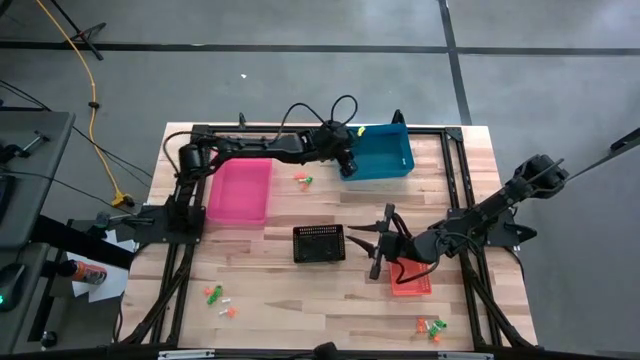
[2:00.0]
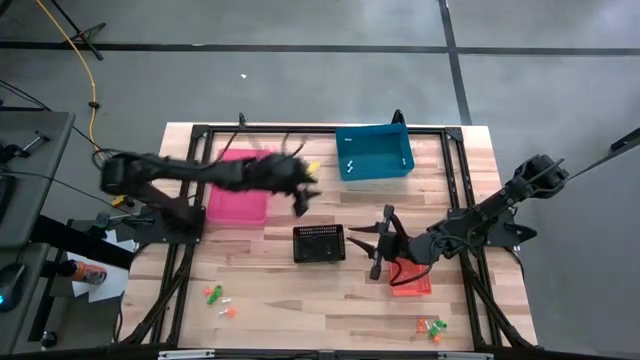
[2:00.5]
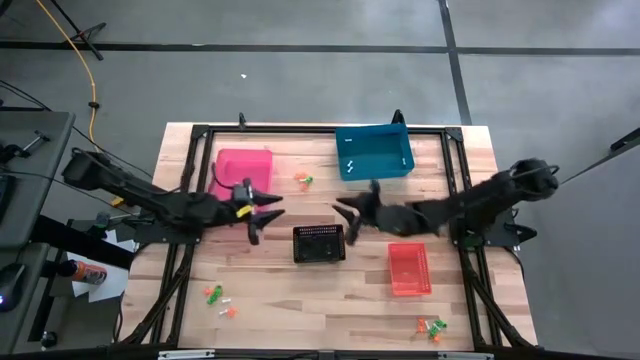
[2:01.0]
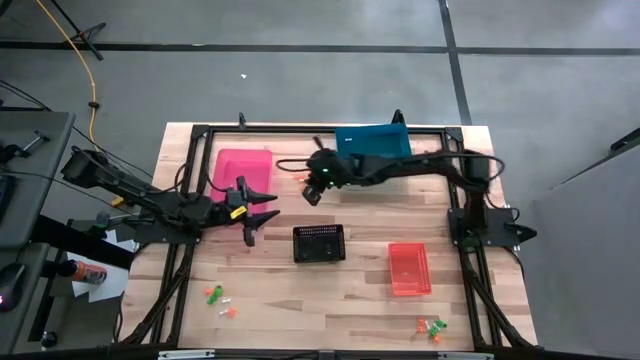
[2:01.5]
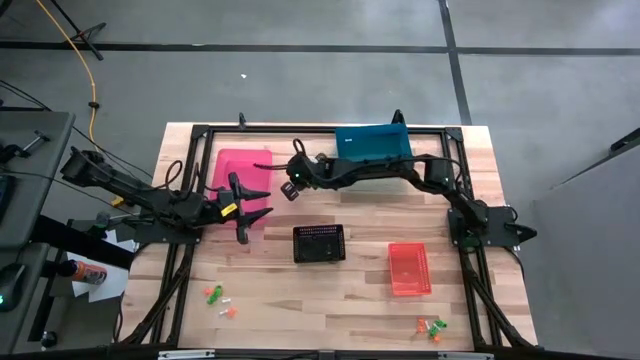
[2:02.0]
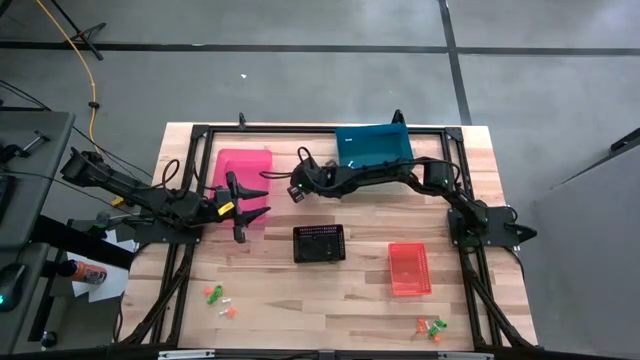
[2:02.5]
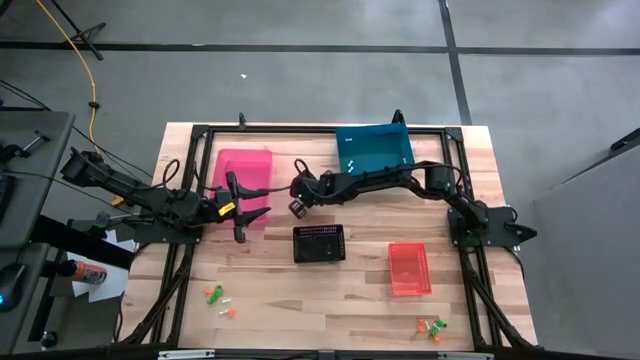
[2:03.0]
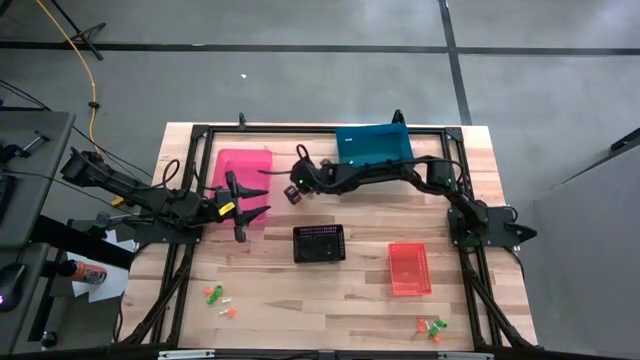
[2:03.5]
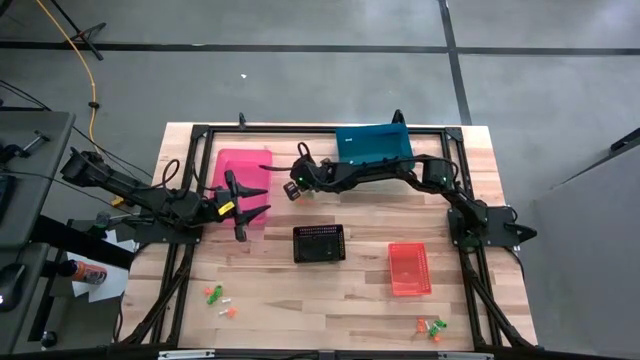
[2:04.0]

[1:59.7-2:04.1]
Task: Sort Halloween decoration
Put the white bone toy into the blue bin

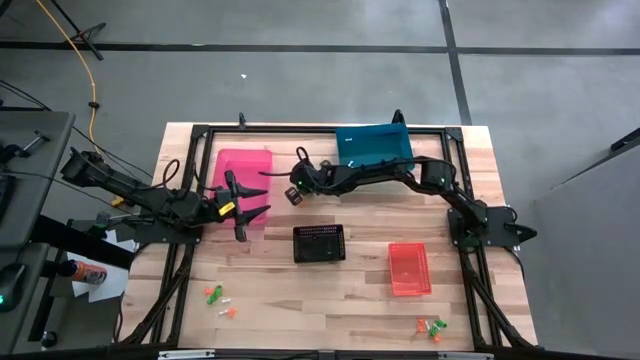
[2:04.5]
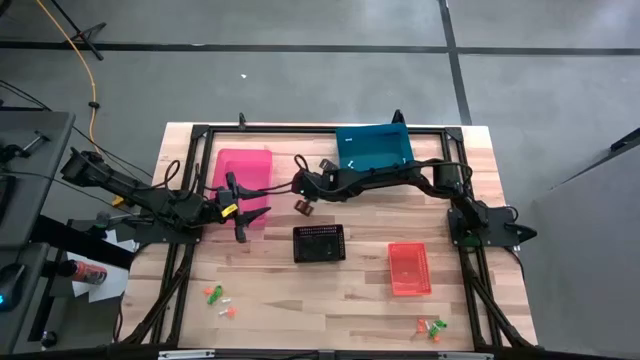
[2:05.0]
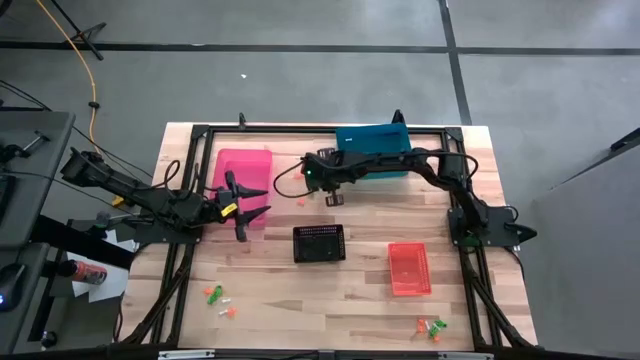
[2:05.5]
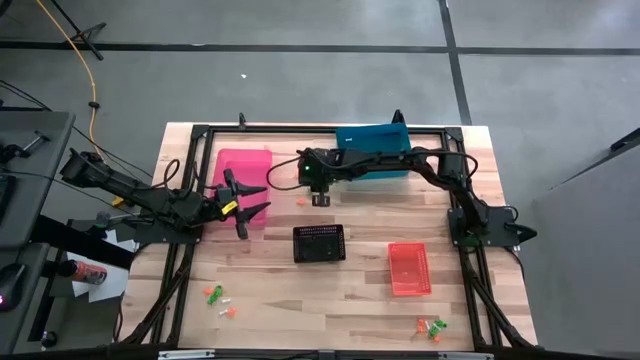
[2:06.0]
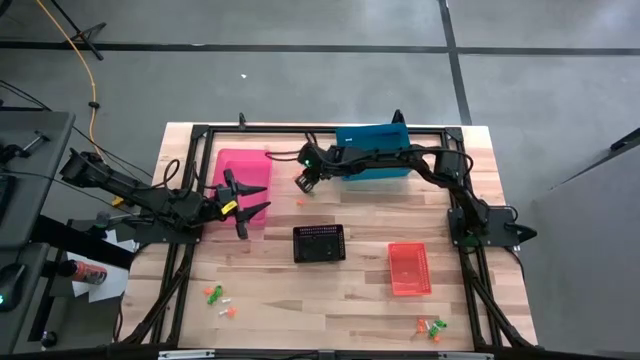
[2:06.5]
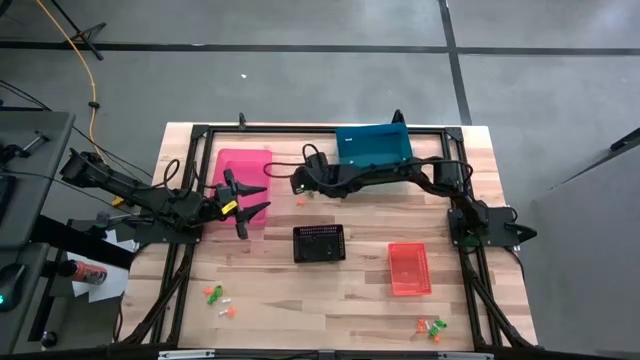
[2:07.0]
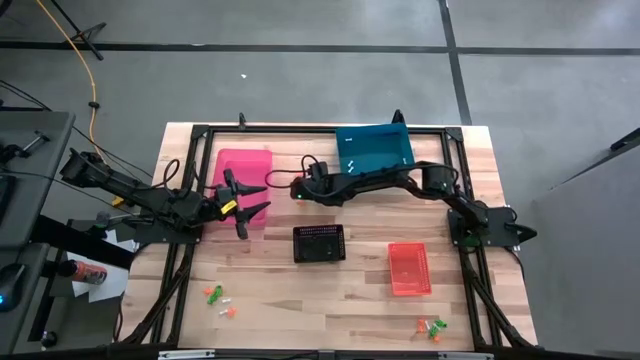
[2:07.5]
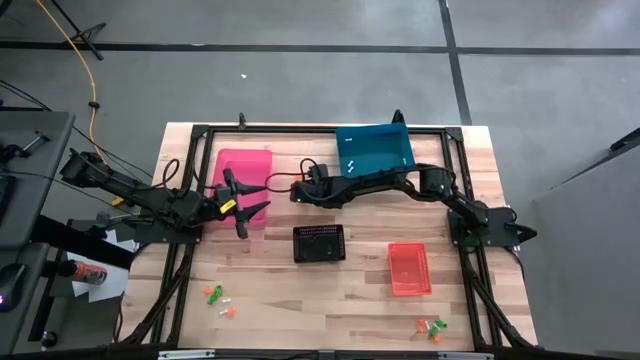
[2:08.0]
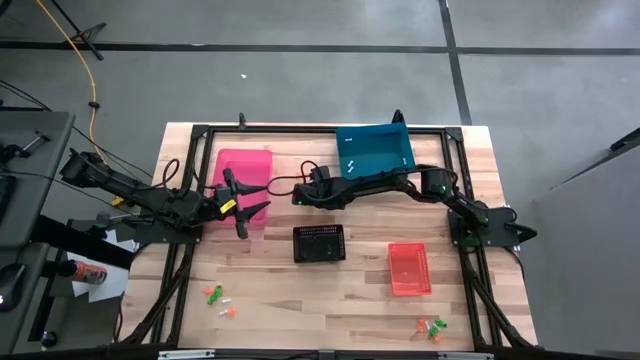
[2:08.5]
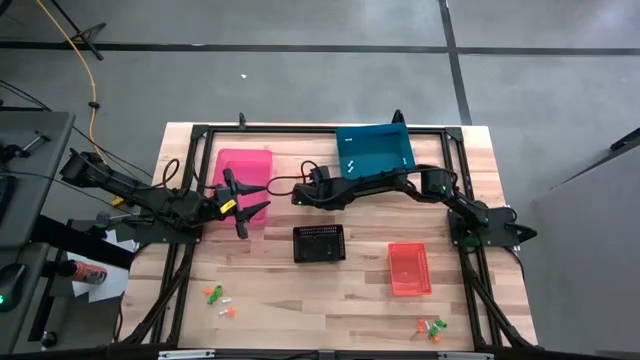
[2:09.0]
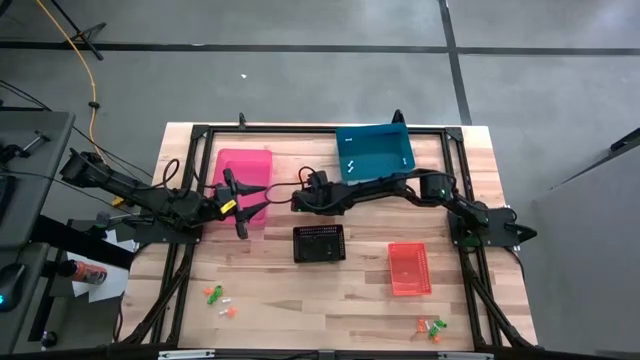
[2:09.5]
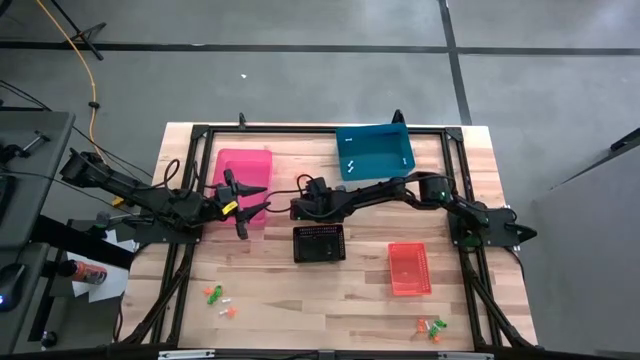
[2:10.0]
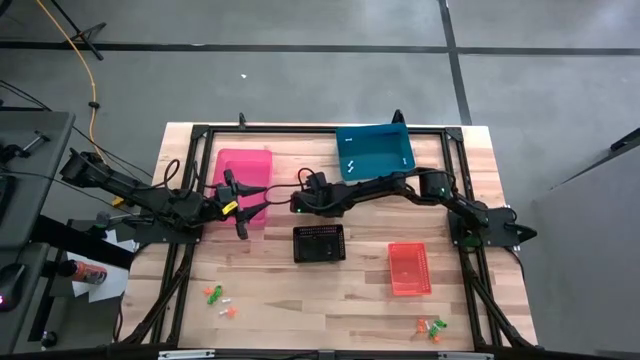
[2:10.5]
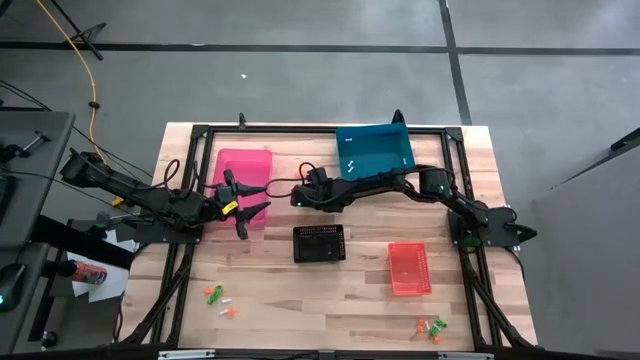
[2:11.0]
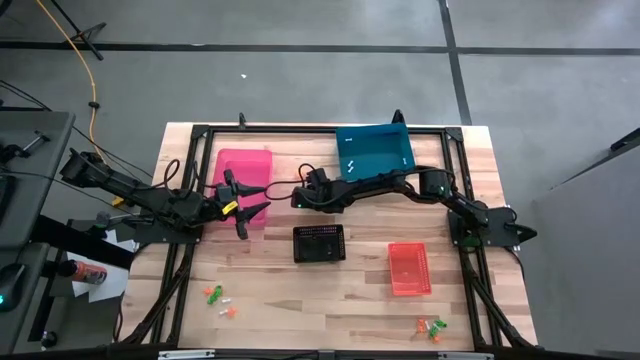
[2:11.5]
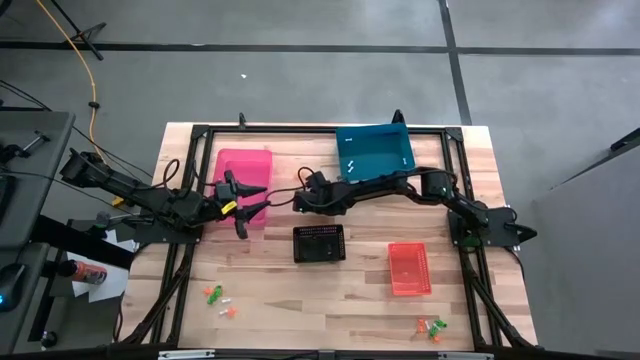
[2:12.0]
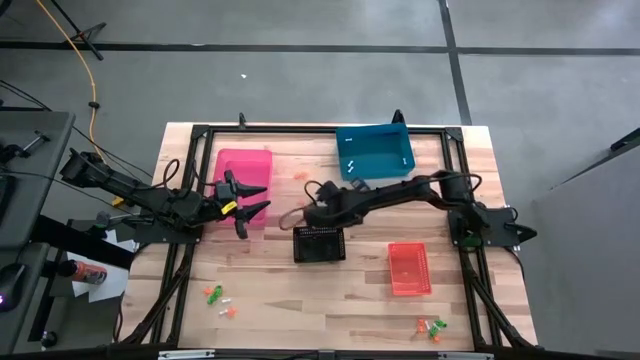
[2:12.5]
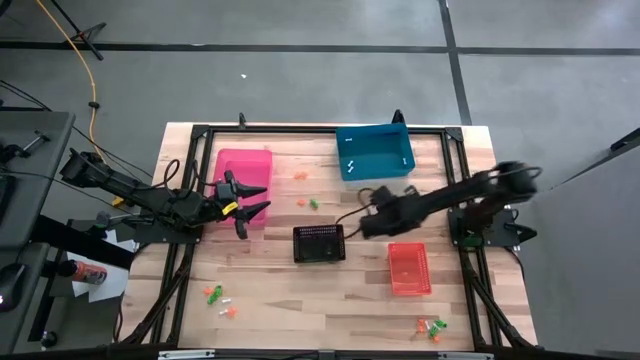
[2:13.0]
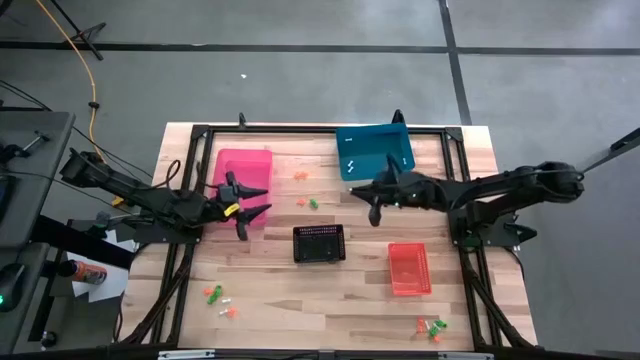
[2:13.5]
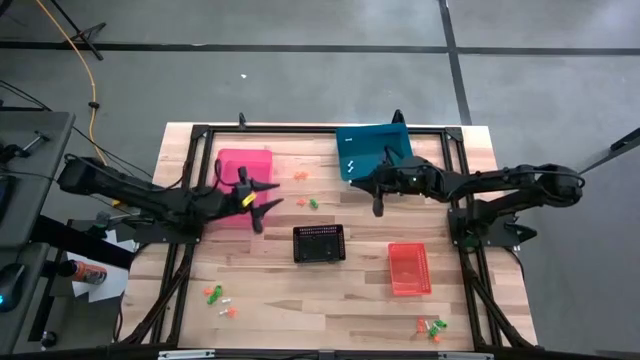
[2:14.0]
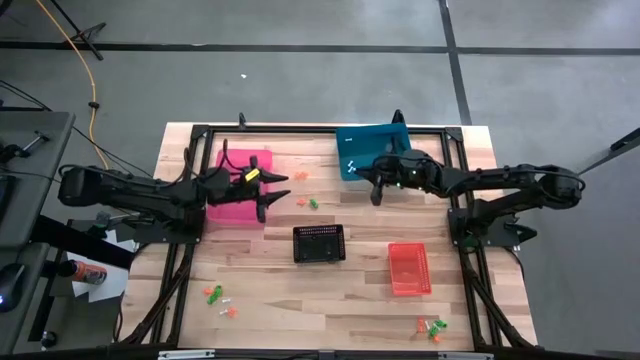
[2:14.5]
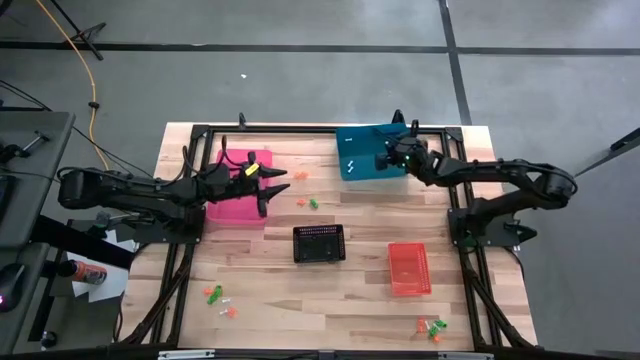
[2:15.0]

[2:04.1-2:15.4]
Put the white bone toy into the blue bin

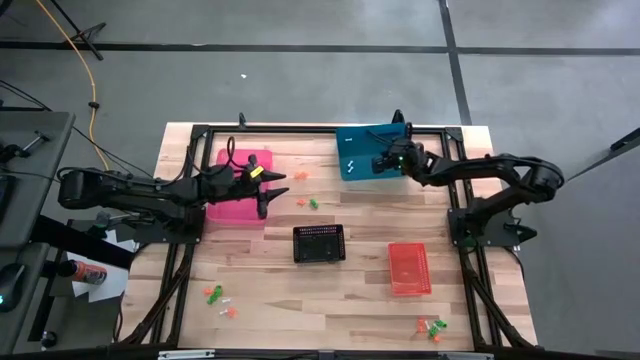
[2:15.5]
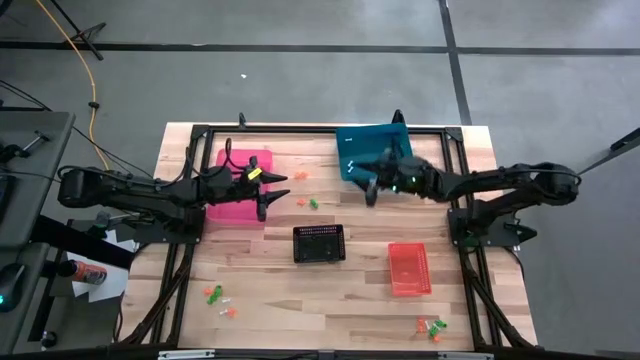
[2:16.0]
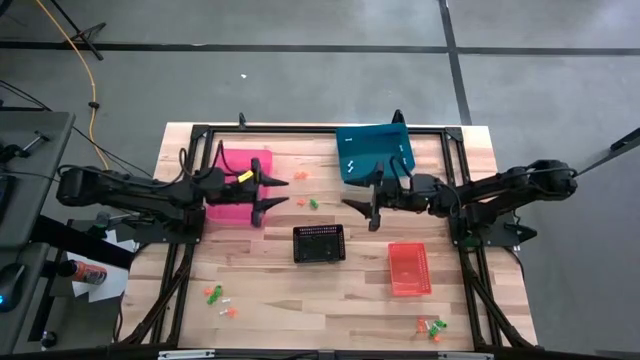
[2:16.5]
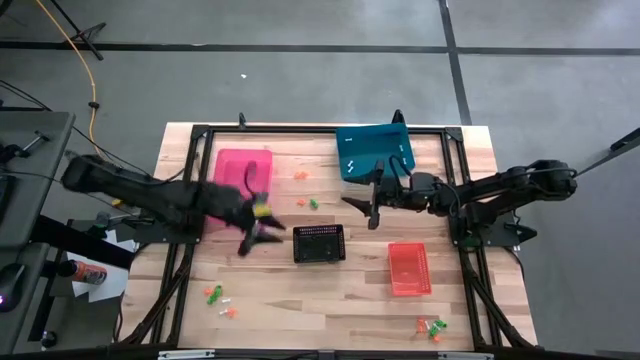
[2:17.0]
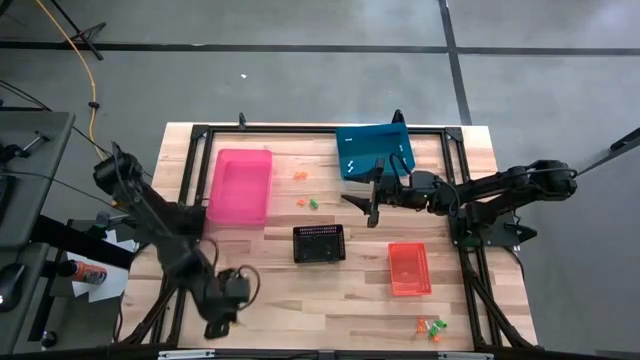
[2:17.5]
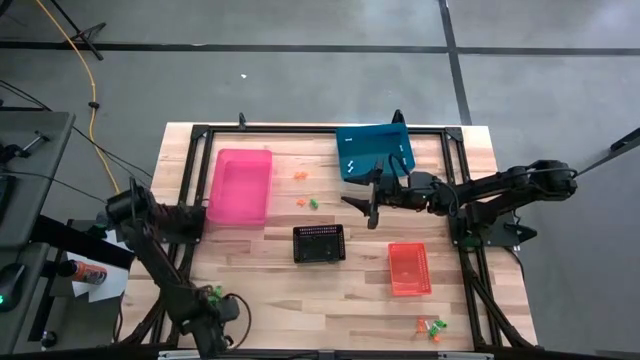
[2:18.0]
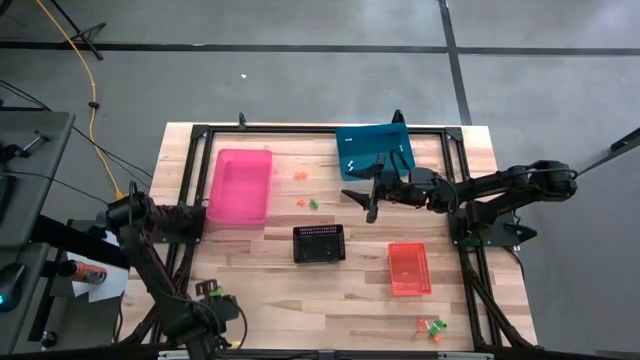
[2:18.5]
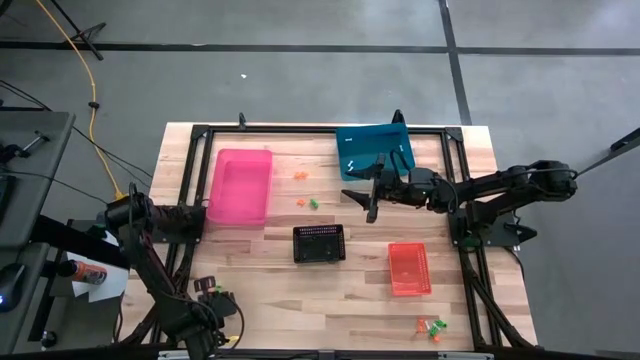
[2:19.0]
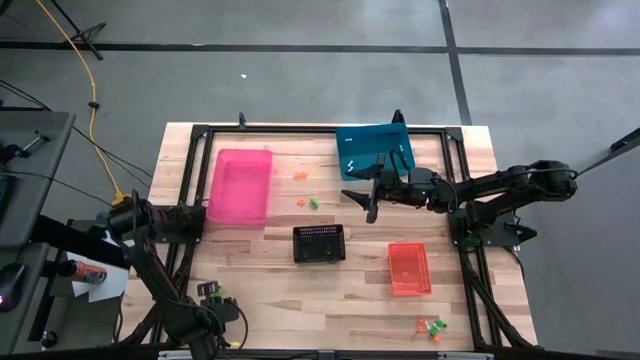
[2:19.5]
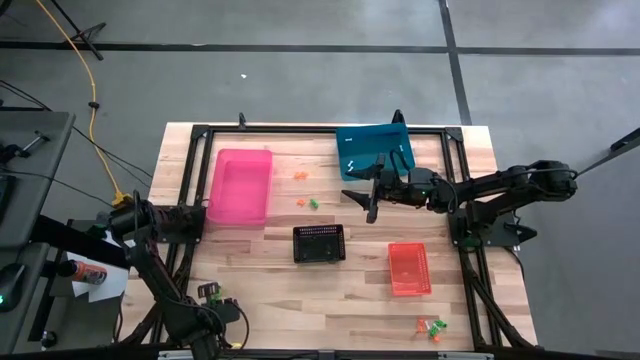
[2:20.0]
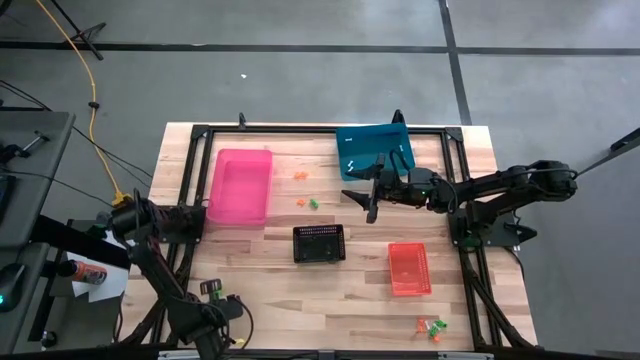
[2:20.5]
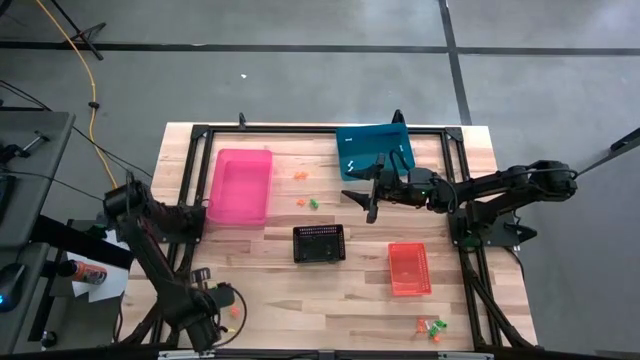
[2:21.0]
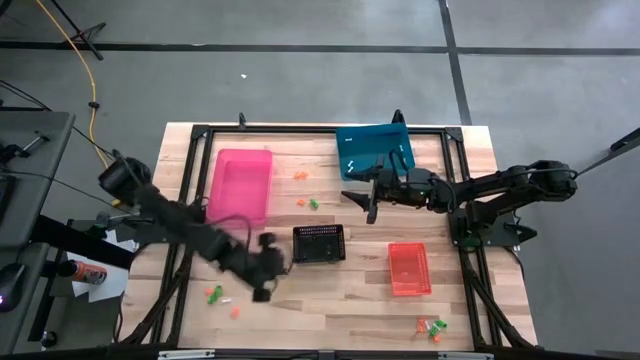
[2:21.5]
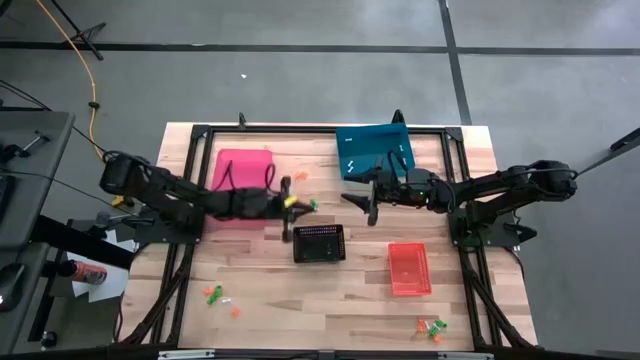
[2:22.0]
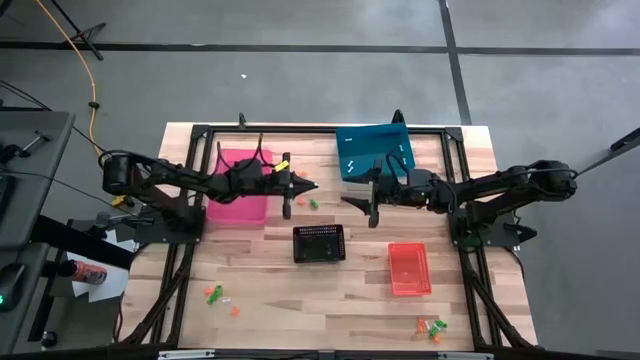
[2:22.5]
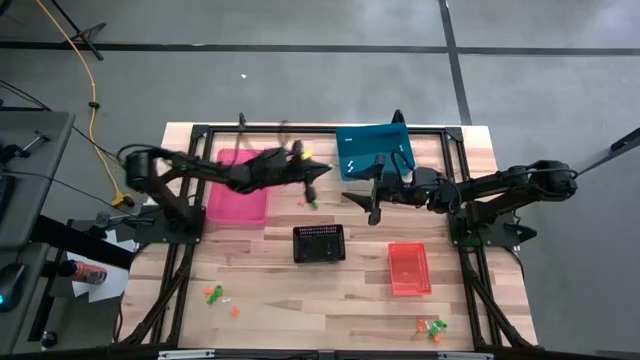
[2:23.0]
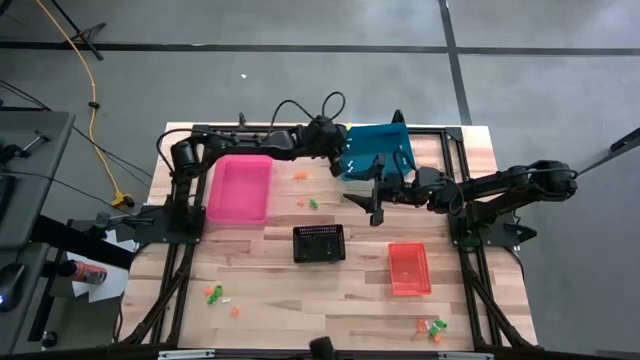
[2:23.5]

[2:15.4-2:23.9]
Put the white bone toy into the blue bin
